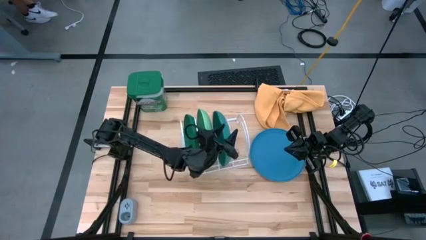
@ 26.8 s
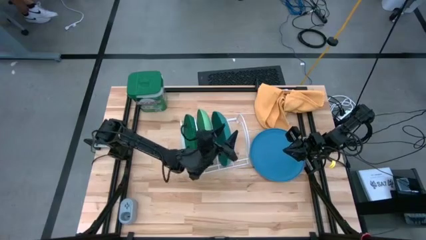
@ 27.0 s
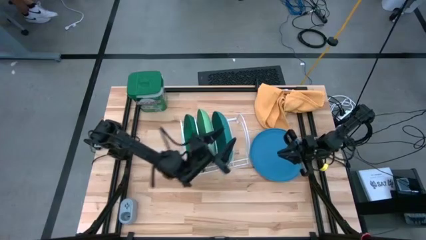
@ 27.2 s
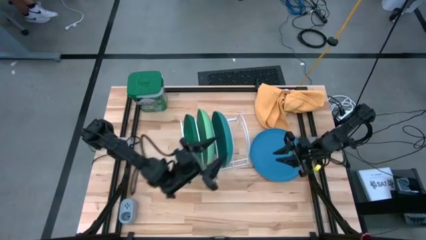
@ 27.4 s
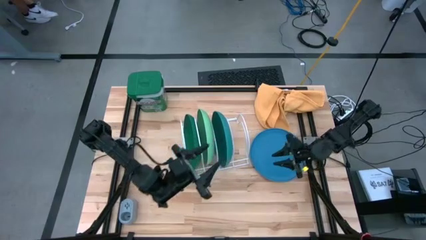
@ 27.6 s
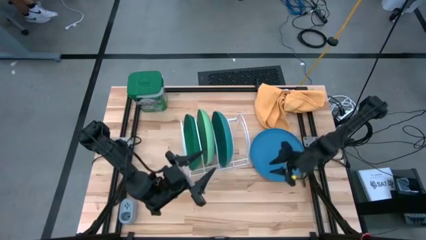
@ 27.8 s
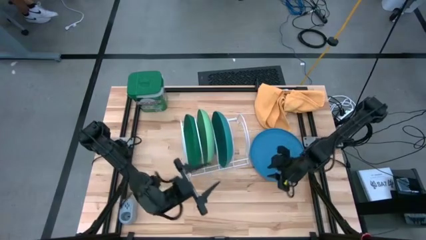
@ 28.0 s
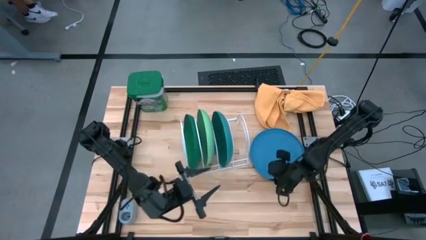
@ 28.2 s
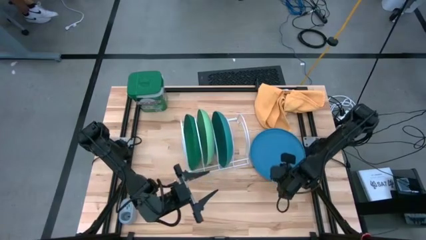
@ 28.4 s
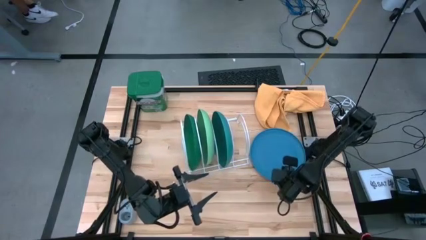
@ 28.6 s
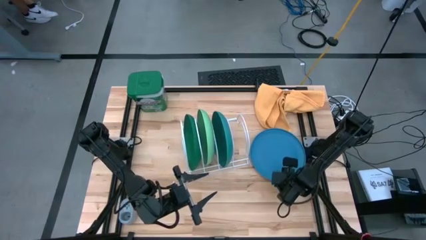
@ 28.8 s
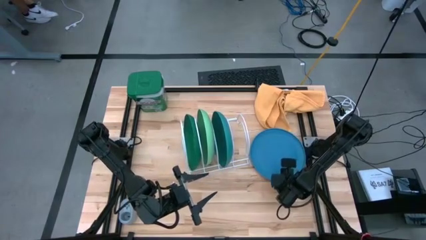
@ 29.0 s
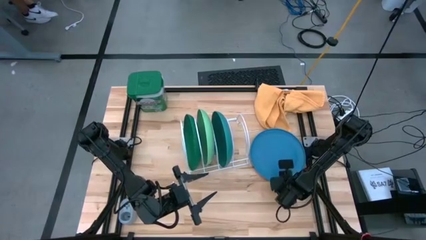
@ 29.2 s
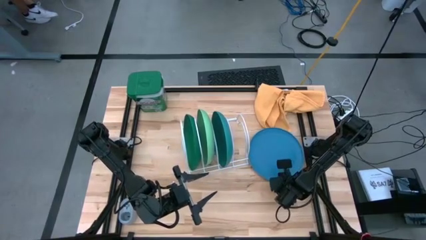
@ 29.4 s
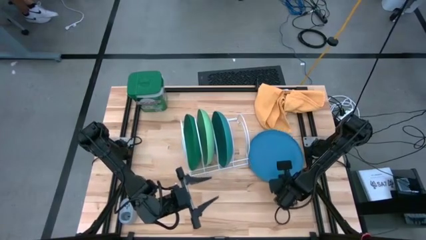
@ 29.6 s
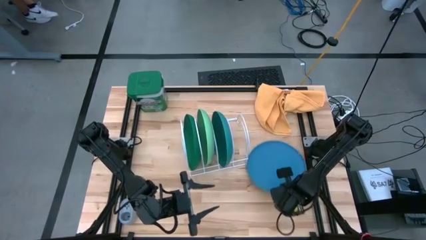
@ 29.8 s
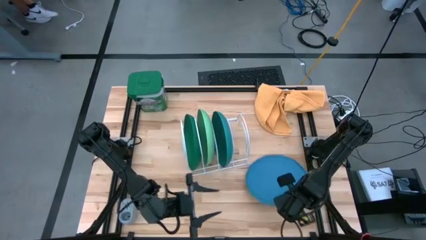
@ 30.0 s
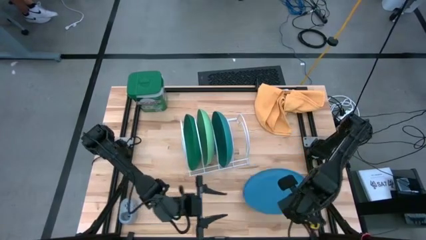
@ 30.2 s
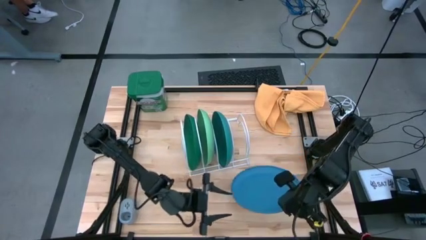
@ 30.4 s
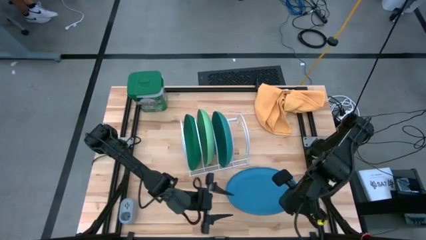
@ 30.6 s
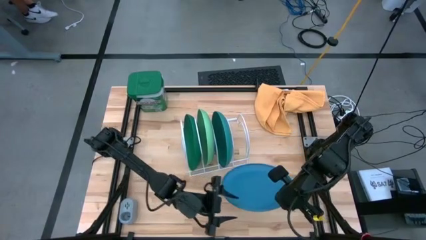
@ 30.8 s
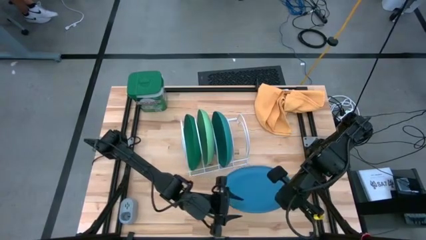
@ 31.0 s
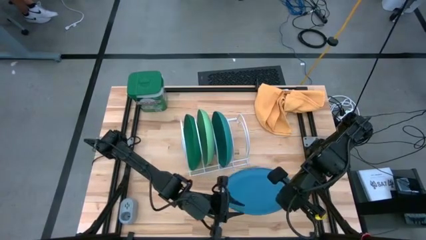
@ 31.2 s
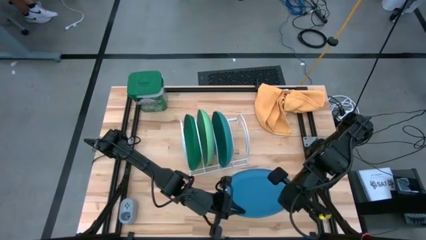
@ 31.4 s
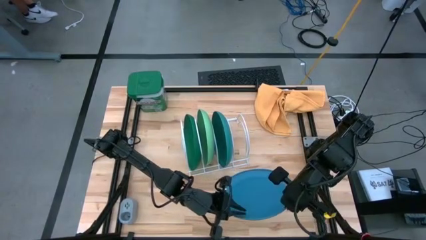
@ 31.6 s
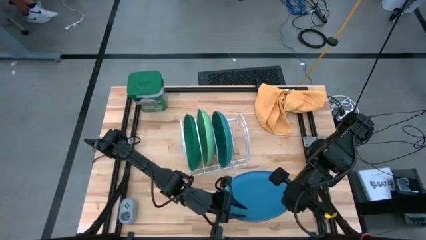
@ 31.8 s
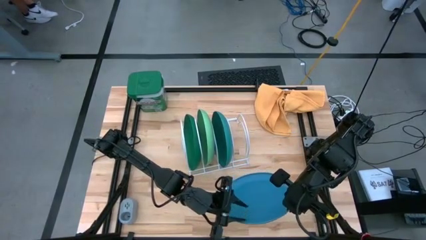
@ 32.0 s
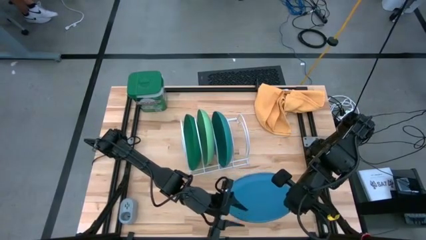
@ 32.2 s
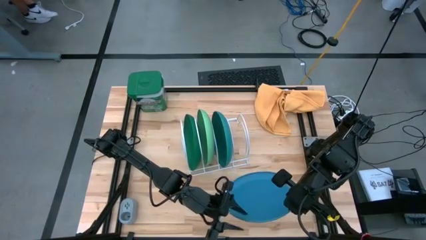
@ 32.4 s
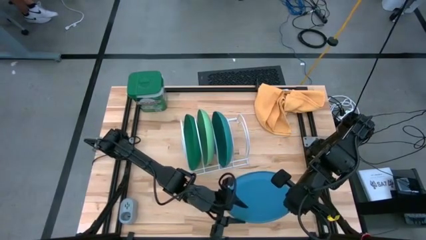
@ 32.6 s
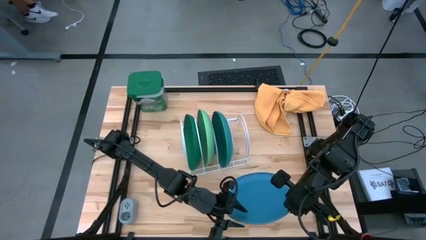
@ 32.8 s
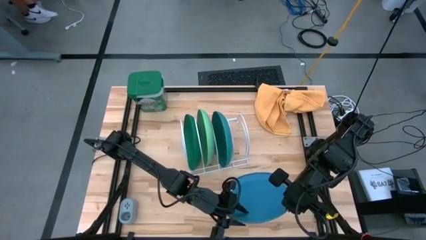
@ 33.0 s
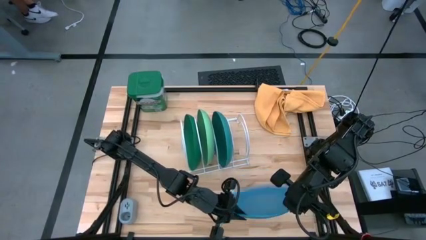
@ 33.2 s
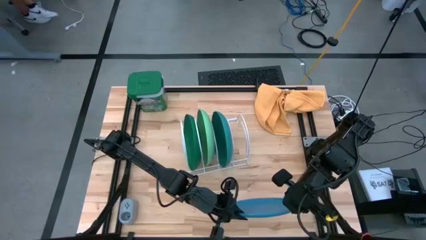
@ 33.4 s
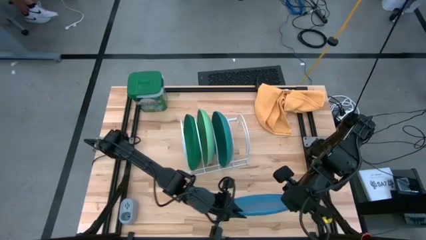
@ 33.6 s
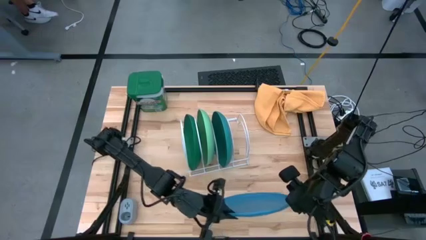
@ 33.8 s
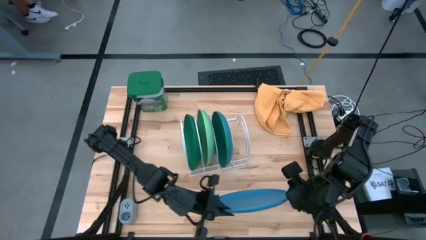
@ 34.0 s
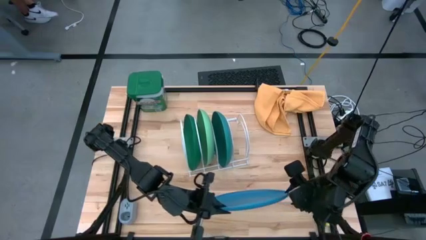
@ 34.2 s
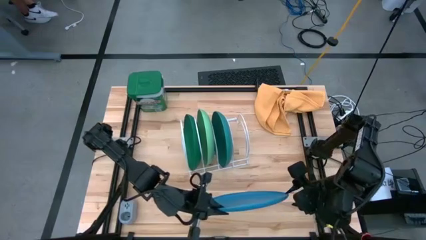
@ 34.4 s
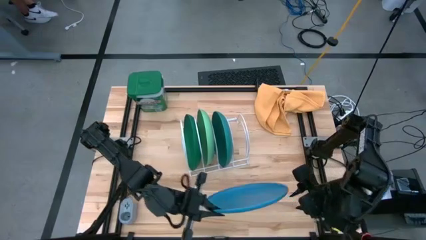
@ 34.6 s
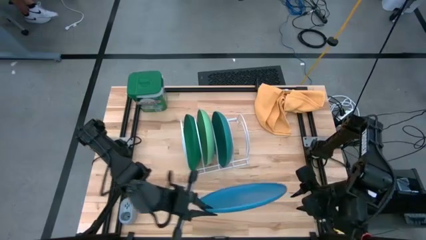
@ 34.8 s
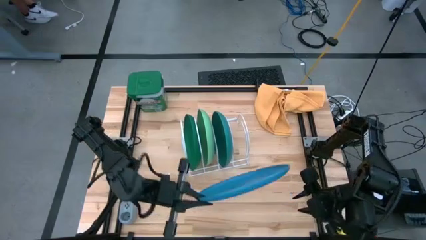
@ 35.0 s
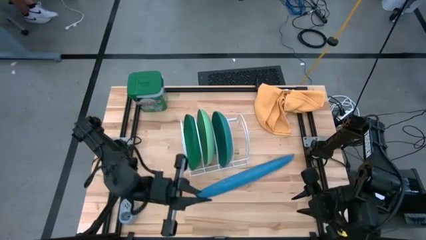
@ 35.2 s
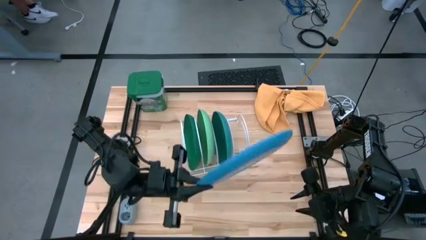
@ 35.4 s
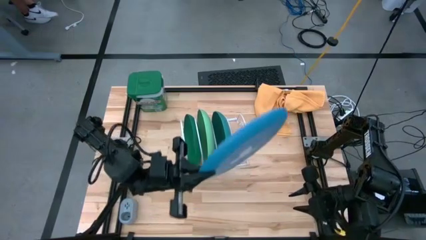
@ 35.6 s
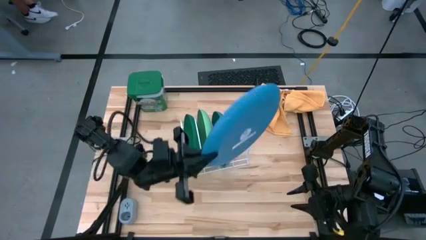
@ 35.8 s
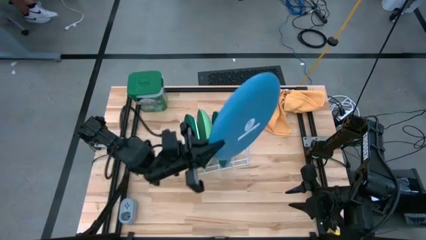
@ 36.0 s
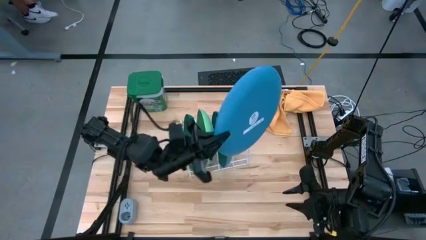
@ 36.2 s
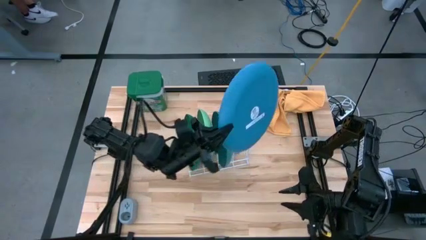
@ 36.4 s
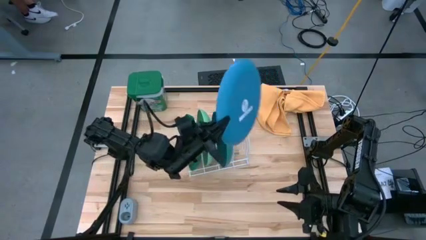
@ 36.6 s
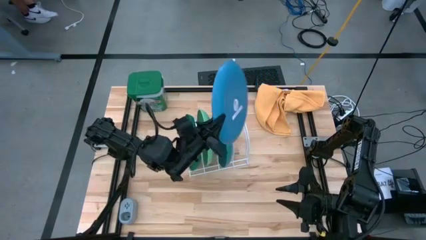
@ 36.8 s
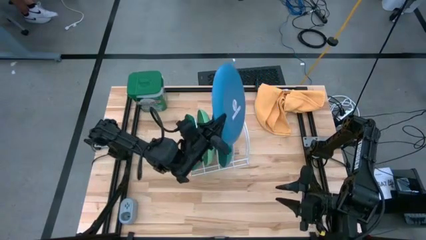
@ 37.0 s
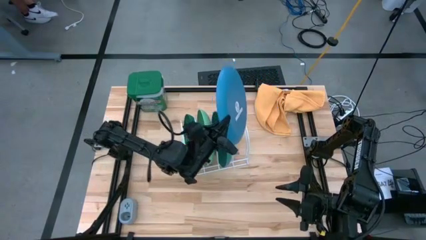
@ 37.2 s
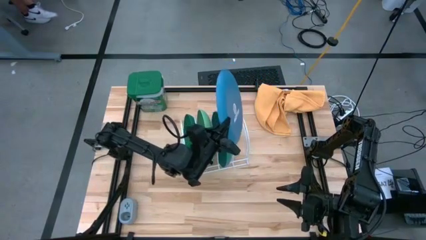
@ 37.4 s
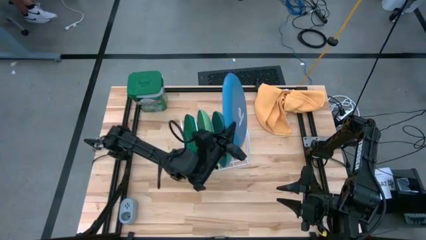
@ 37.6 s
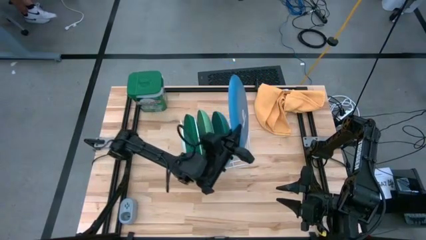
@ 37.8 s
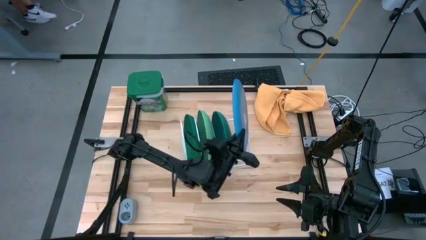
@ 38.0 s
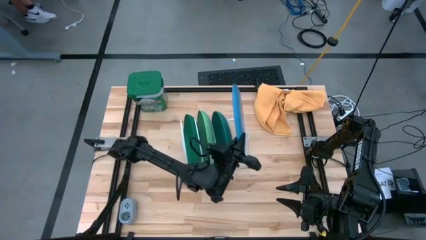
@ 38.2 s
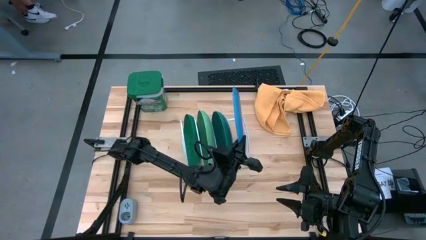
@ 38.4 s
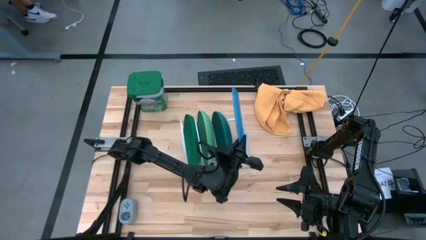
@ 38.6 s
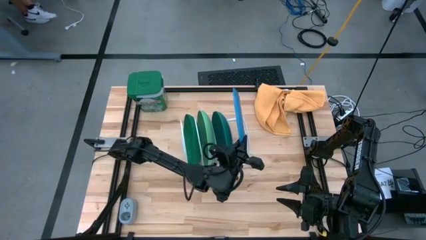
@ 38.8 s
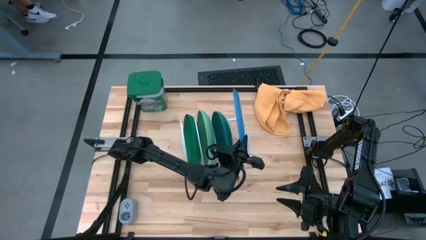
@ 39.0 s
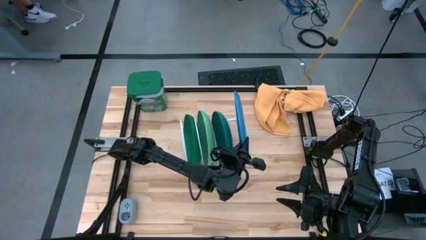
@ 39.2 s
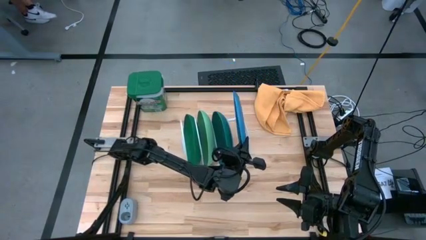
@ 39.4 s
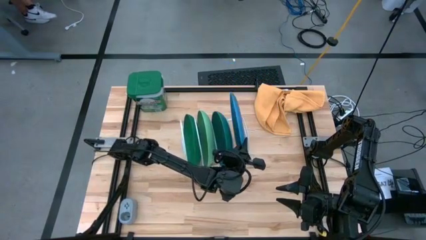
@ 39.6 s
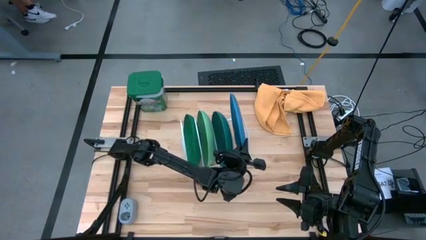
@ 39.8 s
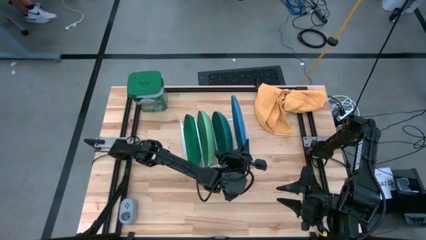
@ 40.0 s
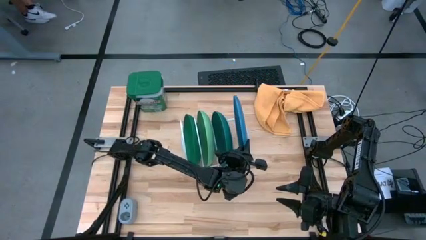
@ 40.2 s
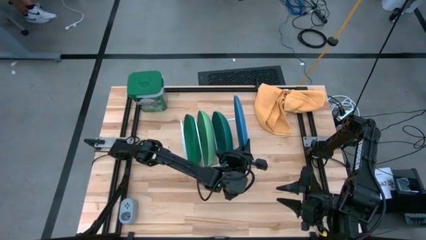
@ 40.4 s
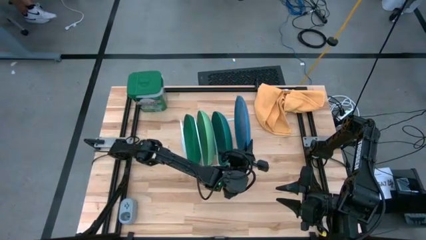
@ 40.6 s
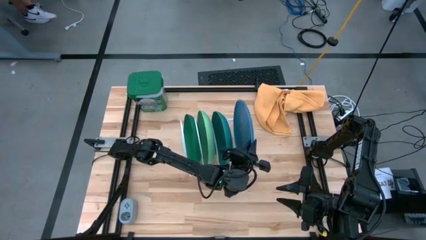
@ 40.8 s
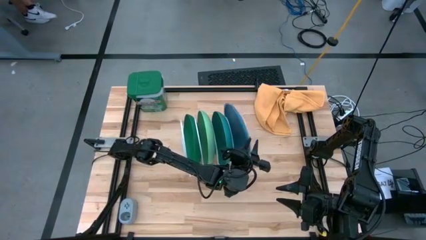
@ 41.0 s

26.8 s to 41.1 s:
Task: Sort dishes
Put the blue plate in the dish rack
